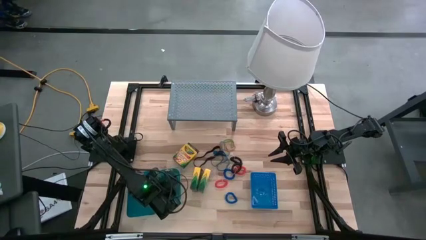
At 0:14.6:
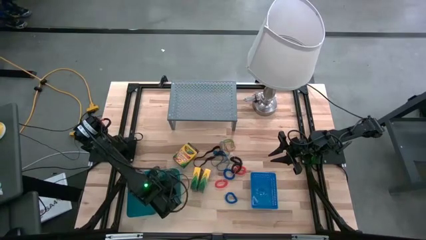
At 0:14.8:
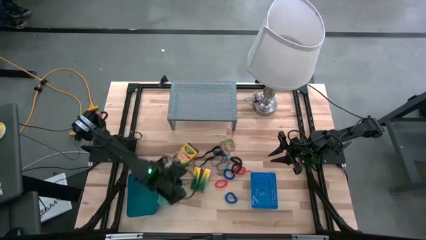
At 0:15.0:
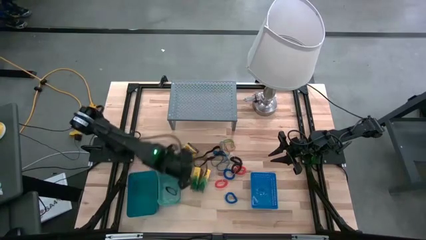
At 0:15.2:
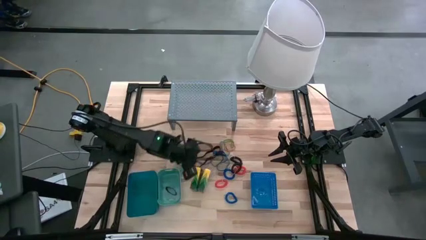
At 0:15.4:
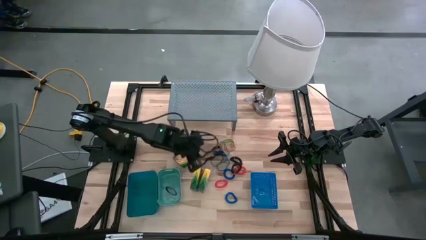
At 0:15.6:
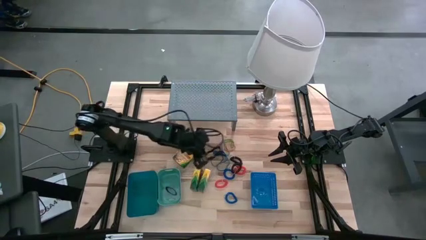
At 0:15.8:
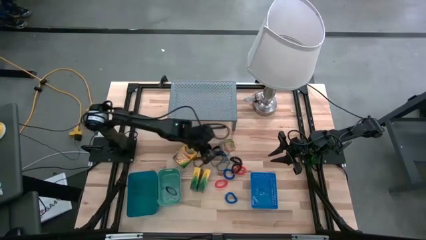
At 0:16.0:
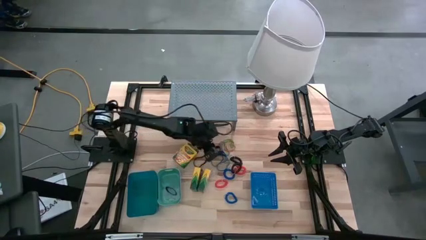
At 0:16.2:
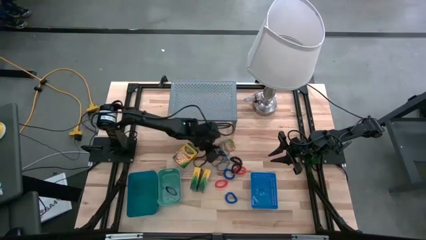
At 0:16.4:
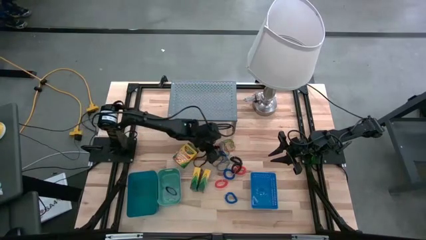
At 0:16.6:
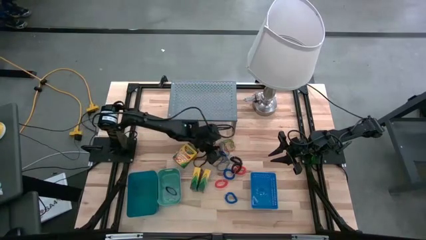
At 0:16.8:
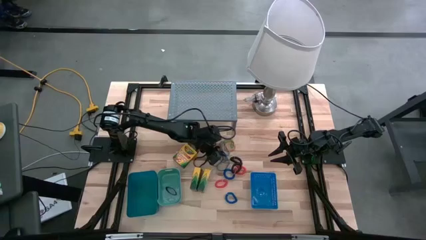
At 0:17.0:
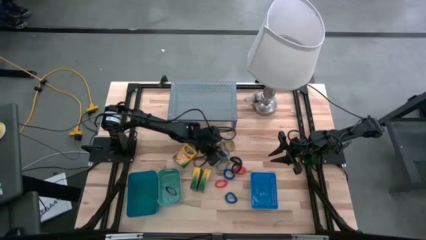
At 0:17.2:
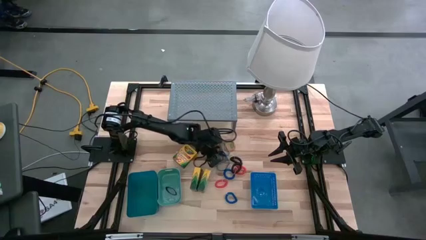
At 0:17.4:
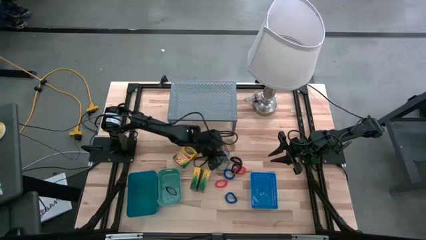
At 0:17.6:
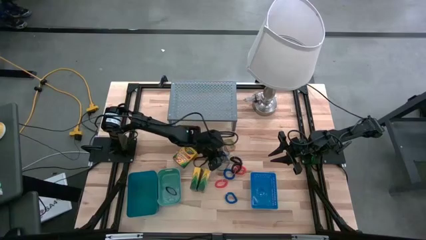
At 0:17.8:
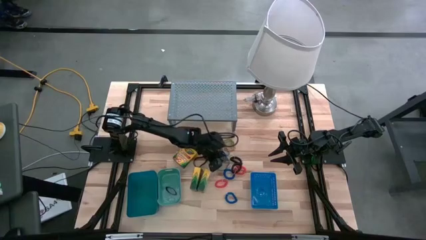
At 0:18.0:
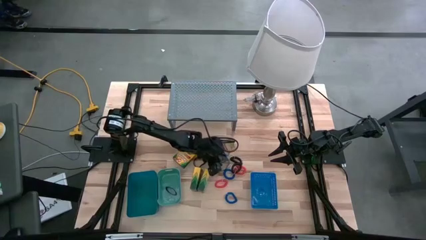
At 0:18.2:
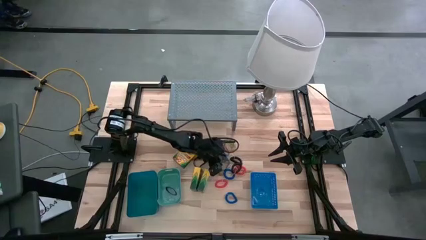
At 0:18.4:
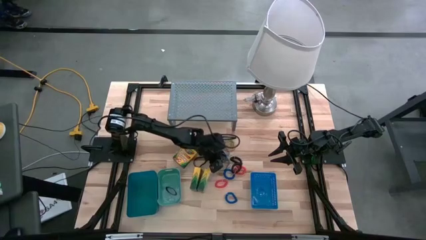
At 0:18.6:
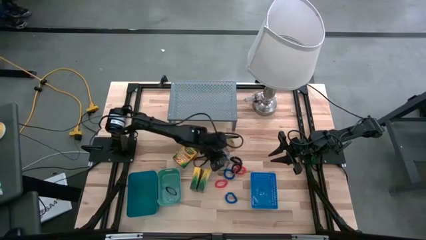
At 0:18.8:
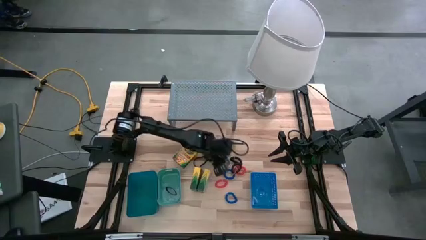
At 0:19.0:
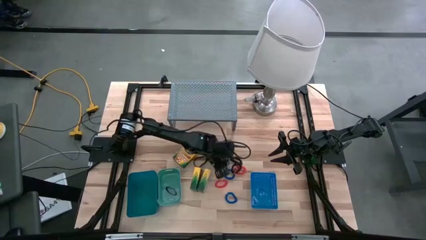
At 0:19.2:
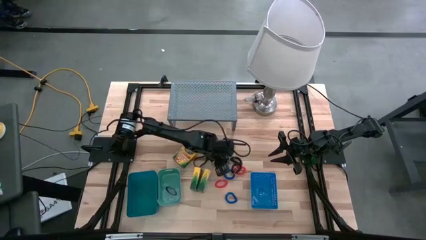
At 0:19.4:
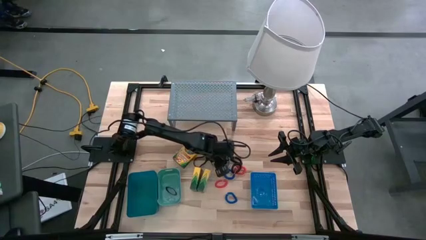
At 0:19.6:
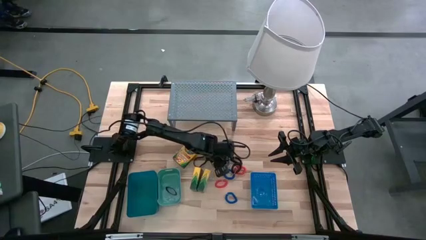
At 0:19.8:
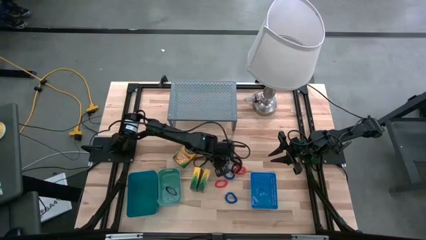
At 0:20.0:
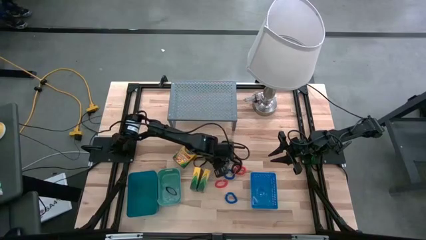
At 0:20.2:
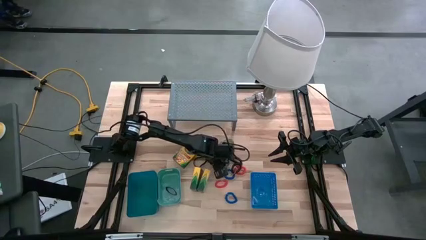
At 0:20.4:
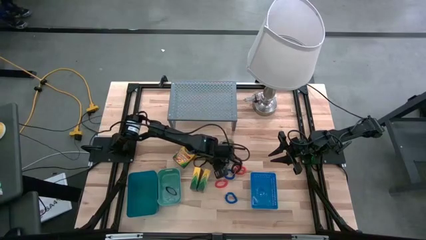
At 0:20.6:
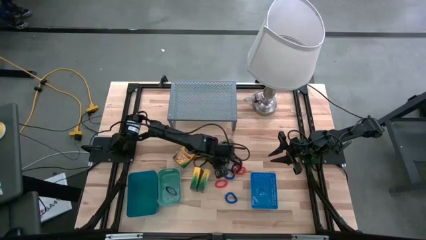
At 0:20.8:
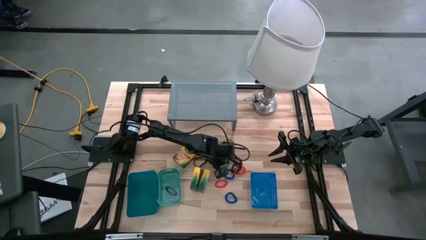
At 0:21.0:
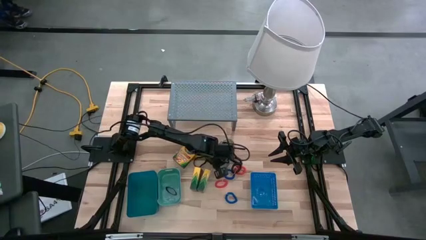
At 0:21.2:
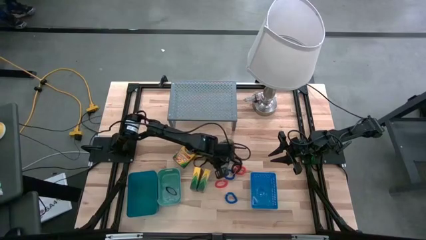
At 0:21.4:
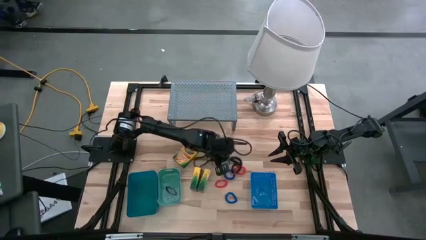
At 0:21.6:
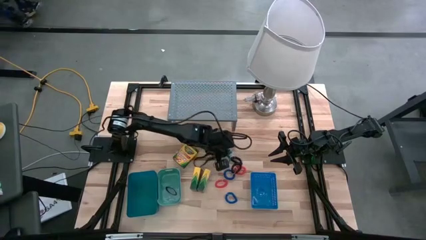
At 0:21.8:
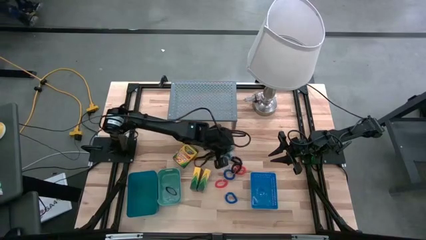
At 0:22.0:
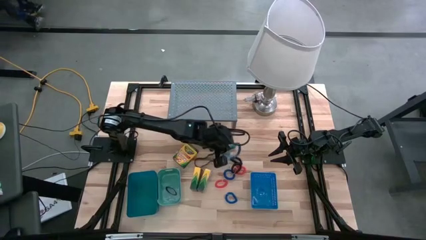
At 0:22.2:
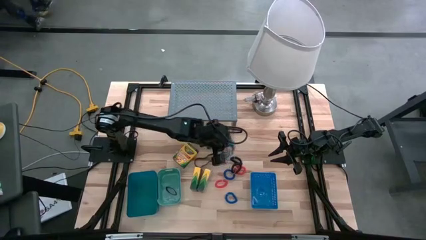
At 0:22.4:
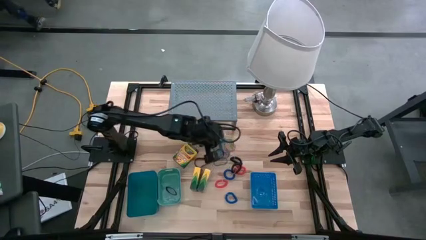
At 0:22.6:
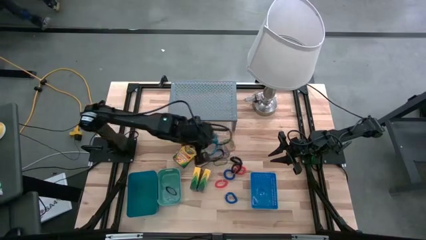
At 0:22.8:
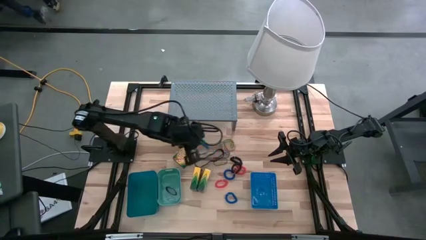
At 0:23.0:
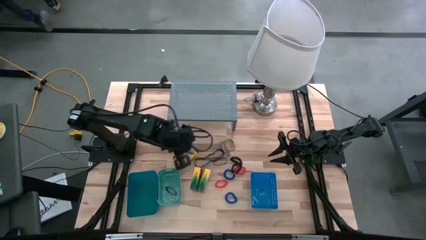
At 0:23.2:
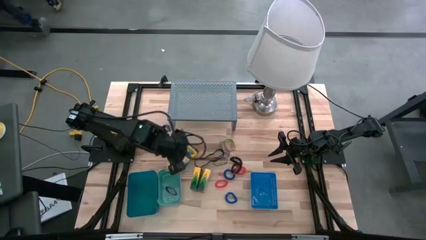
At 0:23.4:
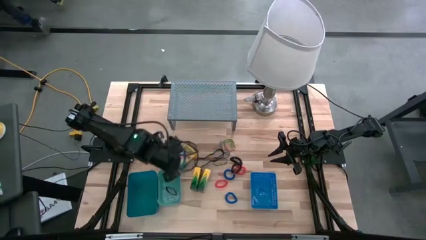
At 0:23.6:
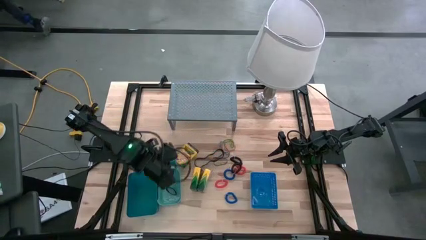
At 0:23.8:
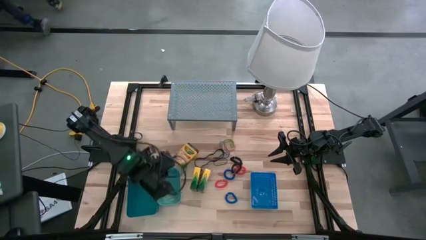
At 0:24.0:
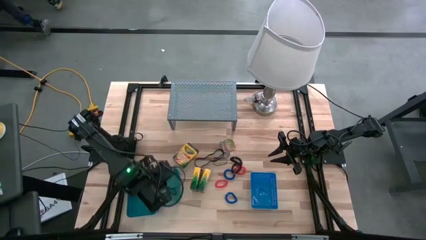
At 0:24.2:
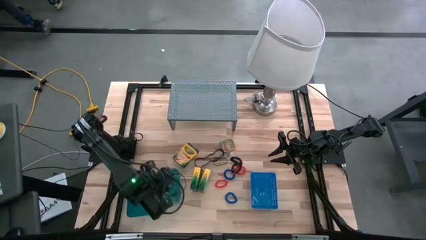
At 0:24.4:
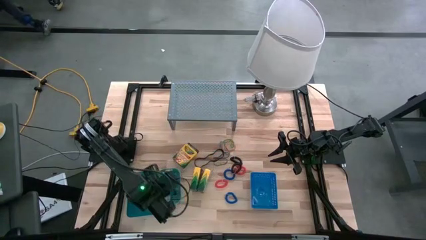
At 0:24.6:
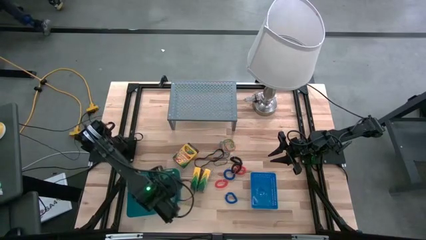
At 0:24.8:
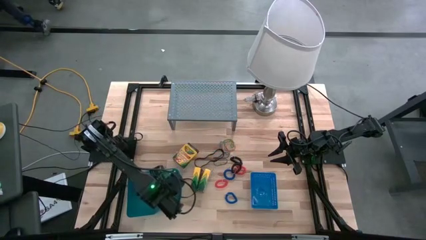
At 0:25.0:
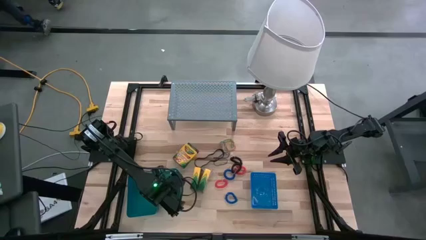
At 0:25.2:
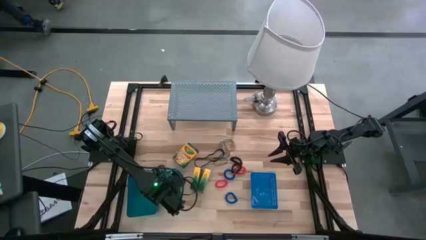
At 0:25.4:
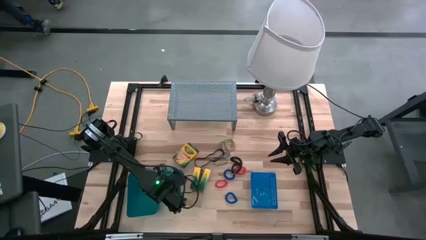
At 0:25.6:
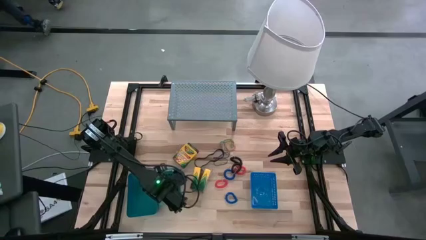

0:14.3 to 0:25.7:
Task: Pick & Place Office Desk Supplies
Put the bottom blue rubber band into the green bin
